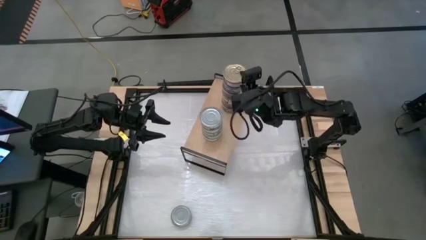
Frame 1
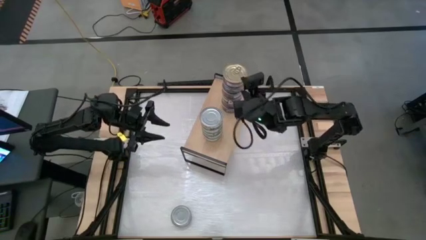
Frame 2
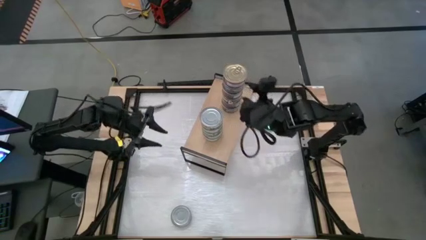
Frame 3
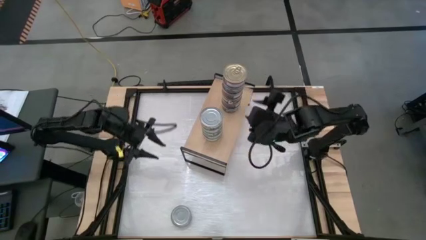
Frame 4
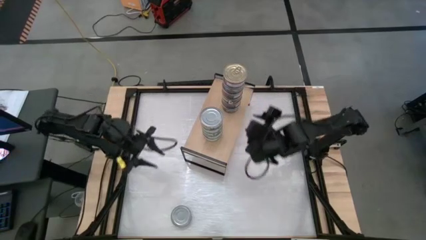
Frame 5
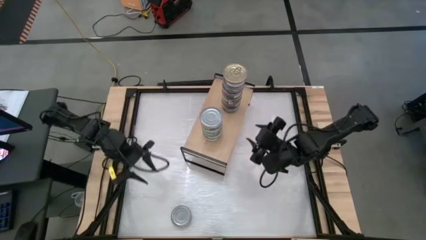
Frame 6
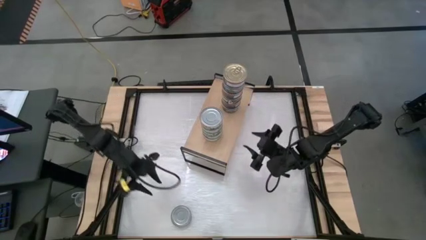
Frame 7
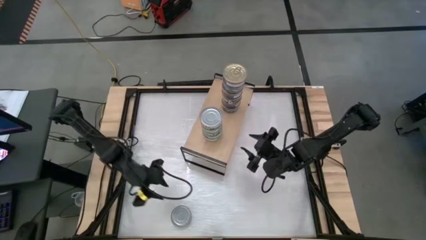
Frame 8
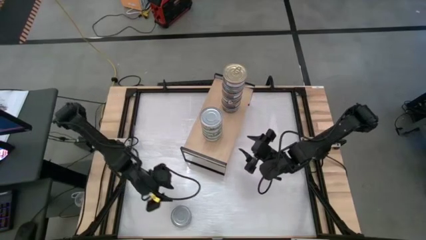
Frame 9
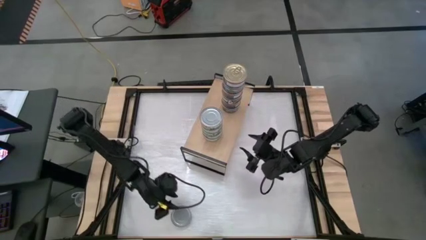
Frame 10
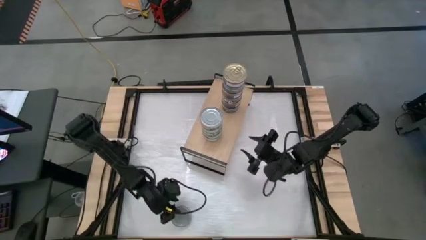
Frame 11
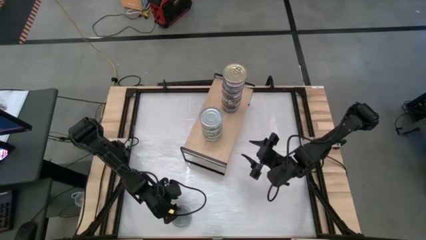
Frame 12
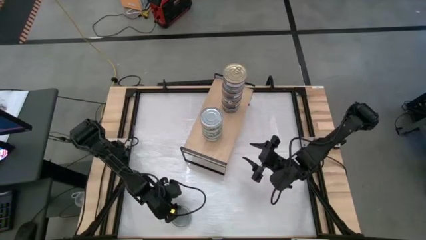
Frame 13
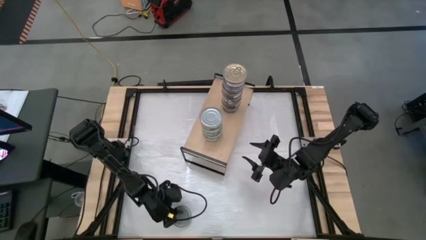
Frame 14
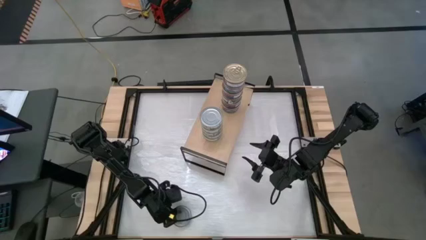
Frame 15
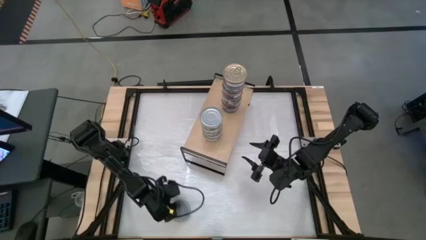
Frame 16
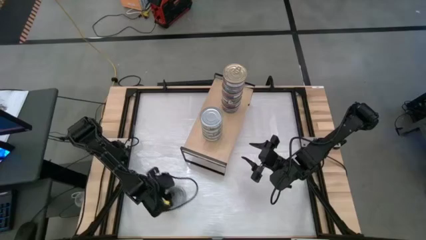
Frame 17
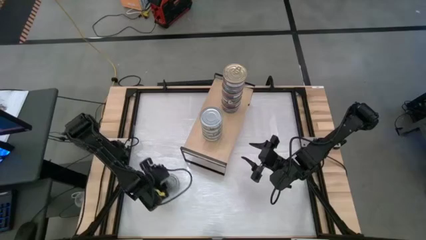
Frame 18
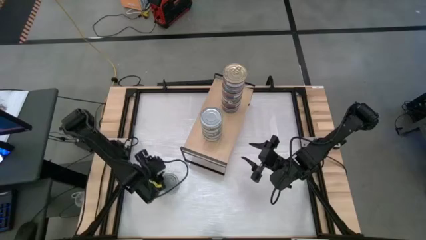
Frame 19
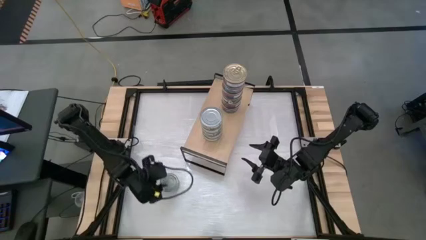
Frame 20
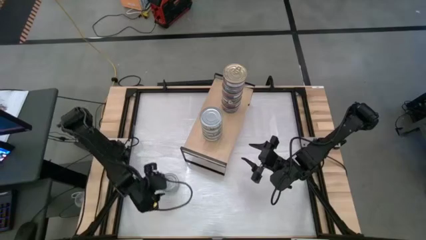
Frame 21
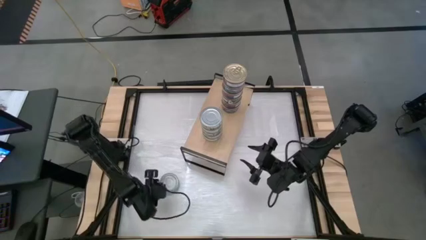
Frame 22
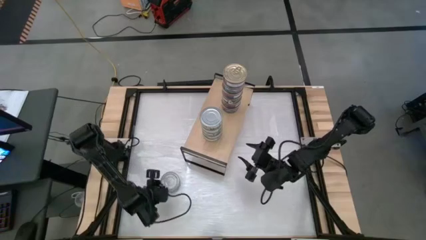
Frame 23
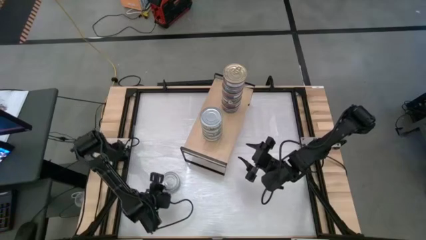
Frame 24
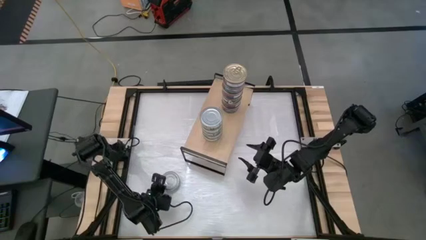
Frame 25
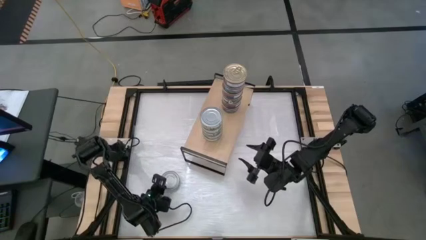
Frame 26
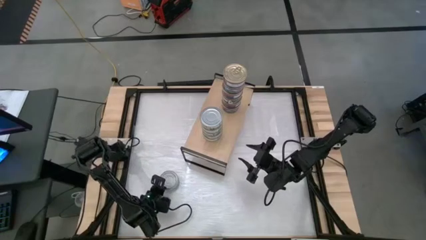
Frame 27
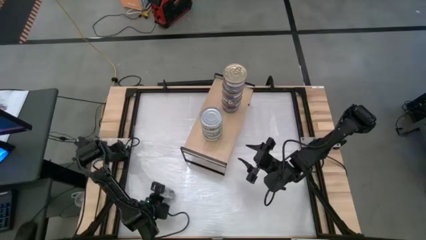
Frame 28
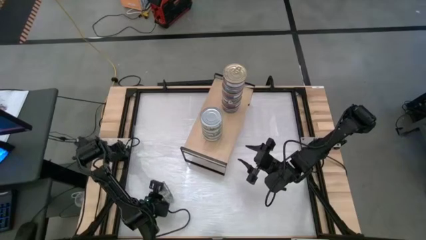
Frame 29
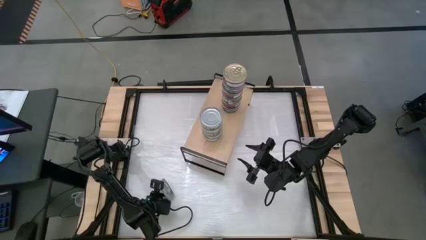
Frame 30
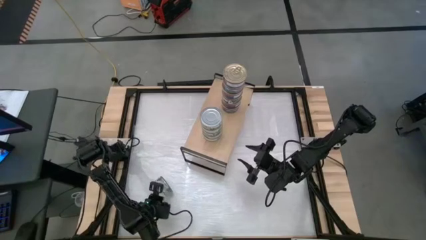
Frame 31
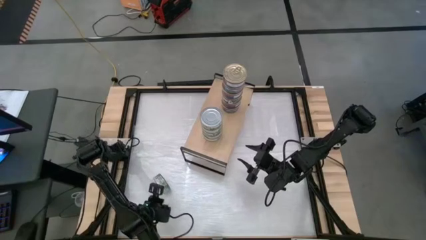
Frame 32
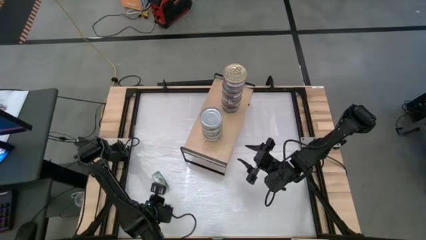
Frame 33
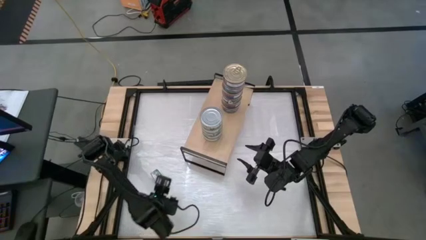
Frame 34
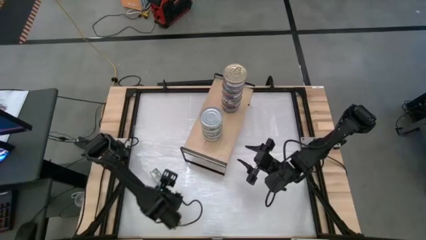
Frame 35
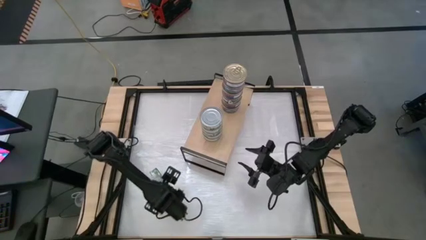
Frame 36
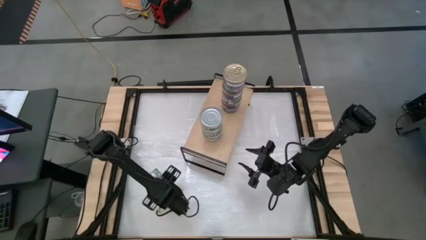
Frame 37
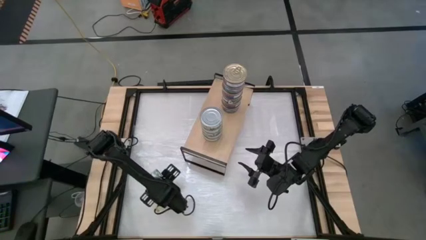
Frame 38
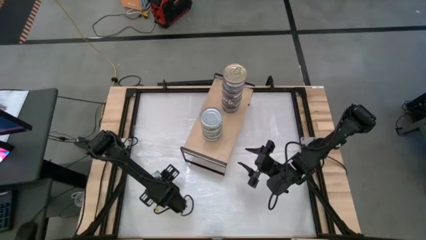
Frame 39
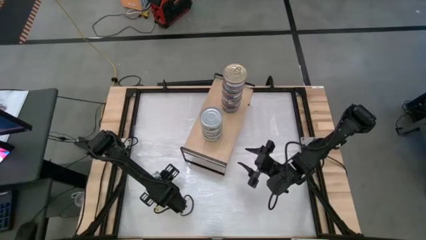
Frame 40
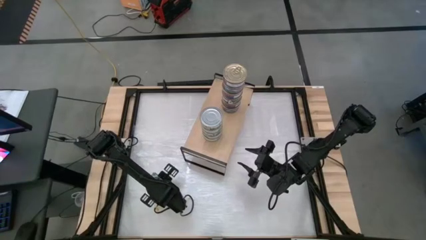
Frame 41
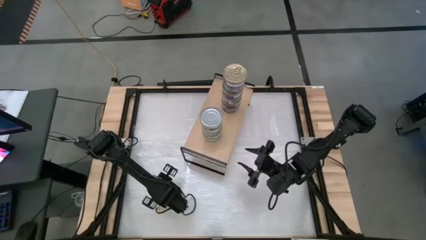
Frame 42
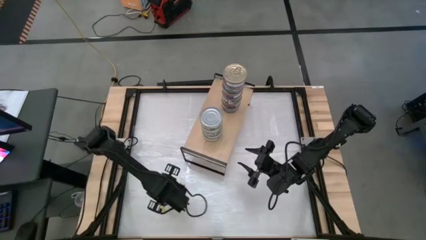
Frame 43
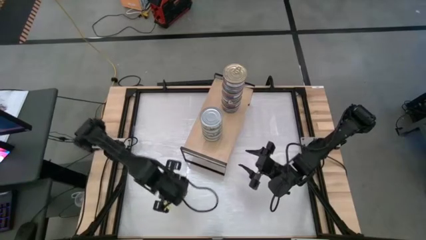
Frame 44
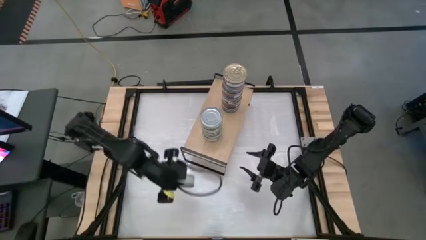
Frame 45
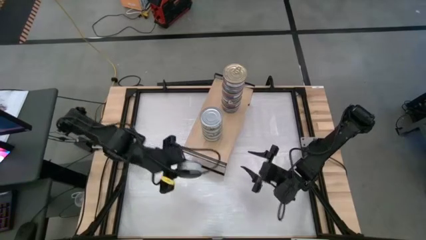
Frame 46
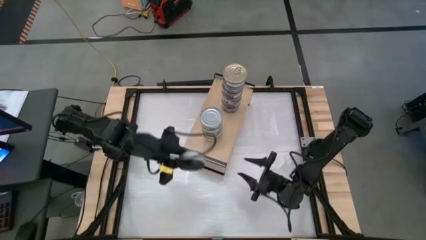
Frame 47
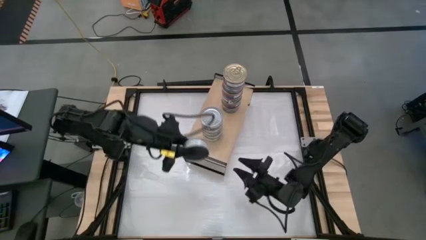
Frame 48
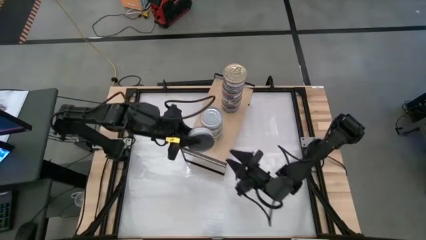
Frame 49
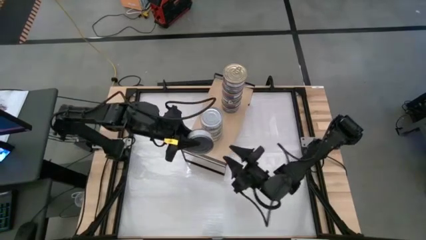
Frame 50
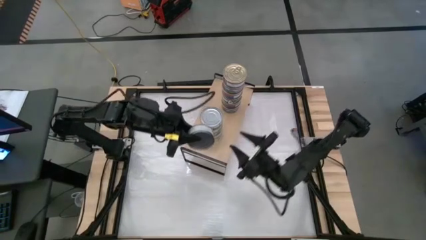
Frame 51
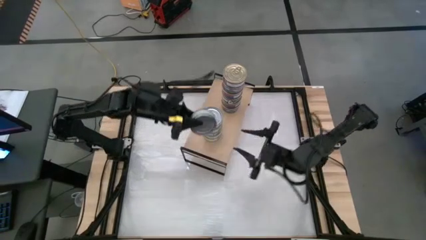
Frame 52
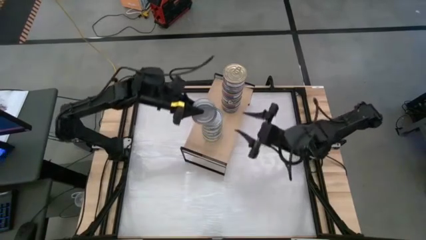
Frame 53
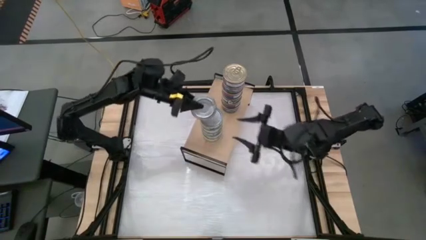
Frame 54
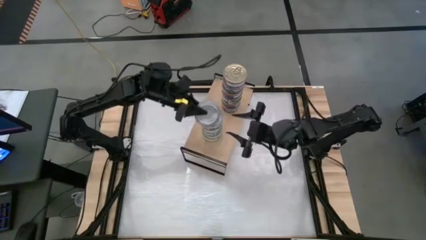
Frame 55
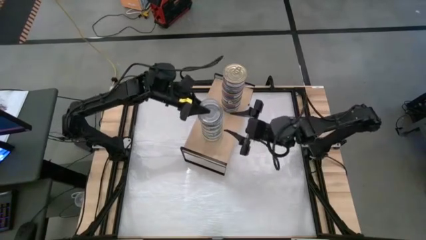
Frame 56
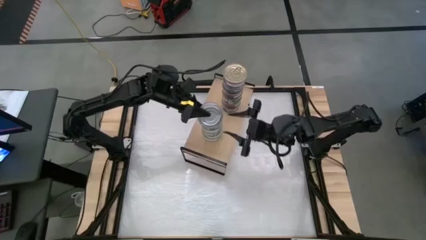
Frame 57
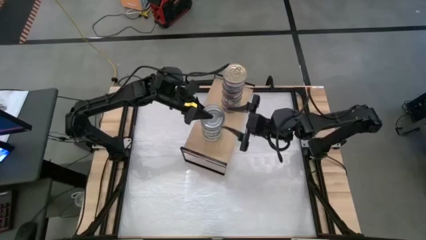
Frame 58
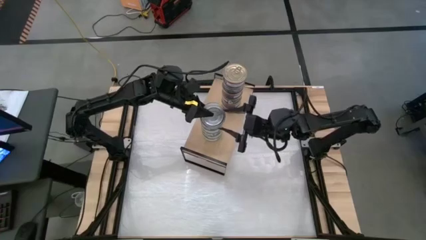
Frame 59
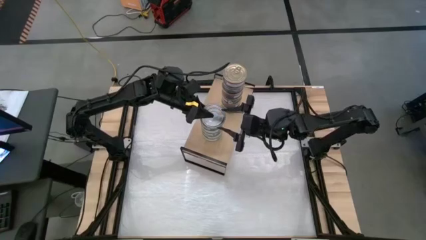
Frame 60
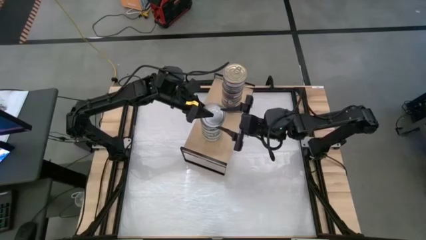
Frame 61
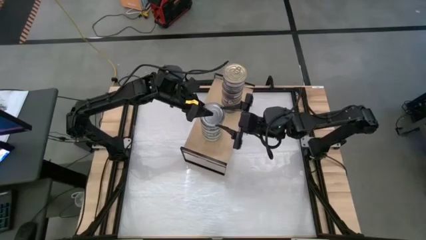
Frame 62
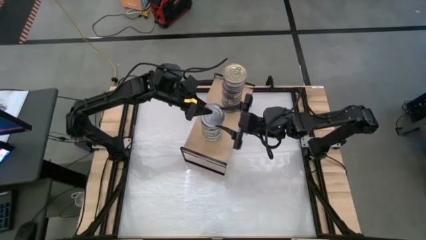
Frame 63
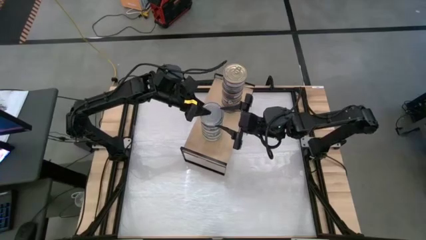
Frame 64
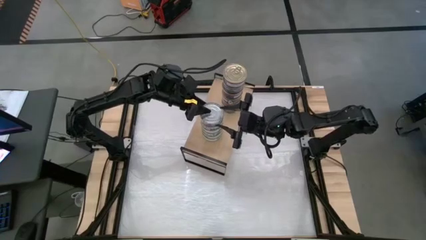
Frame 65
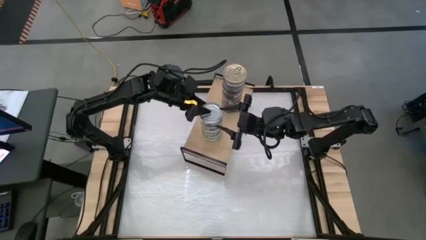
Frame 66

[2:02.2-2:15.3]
Task: Stack canned seafood by type on shelf
Stack the green tuna can on top of the stacked green tuna can on the shelf
